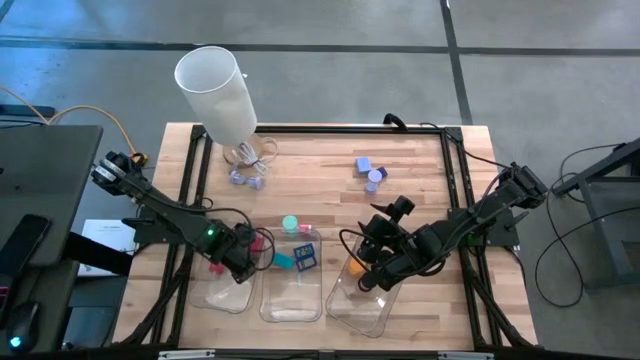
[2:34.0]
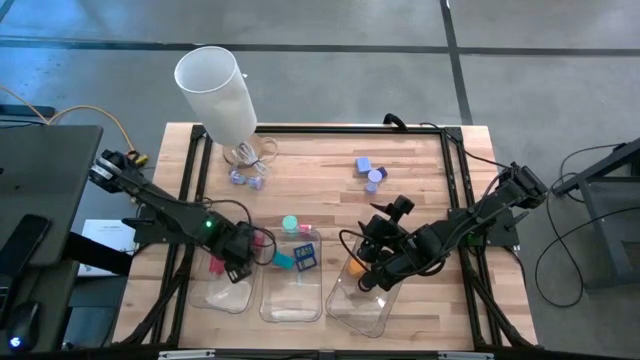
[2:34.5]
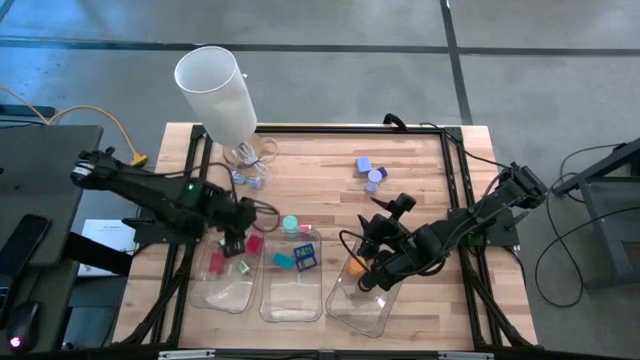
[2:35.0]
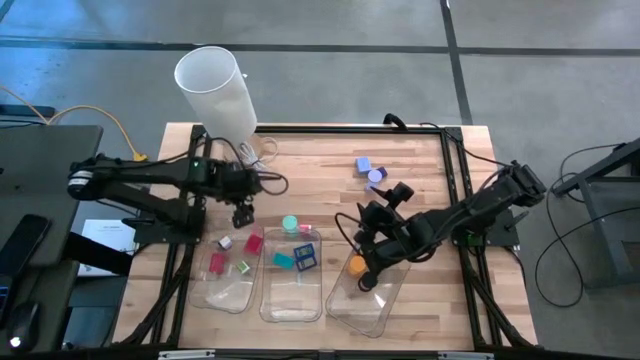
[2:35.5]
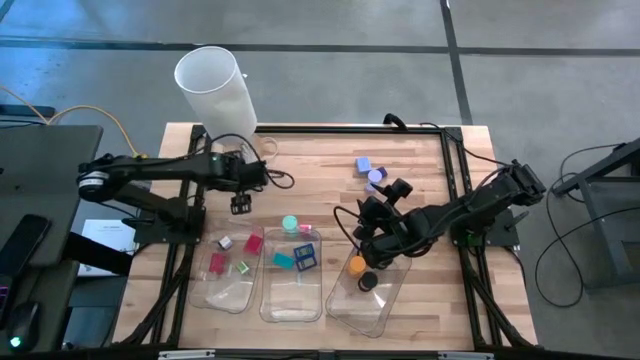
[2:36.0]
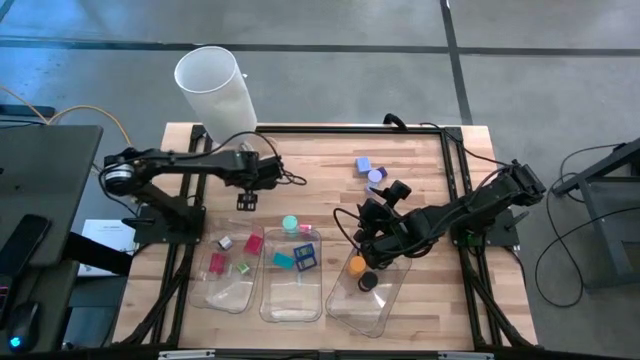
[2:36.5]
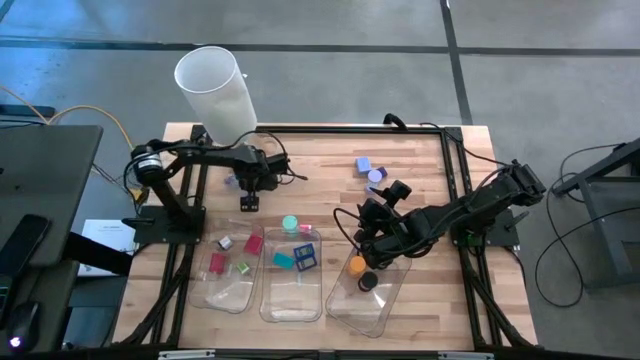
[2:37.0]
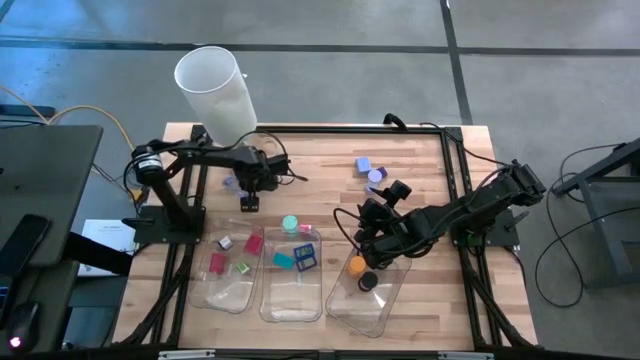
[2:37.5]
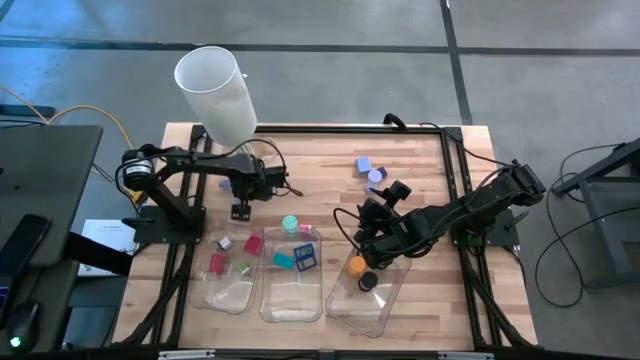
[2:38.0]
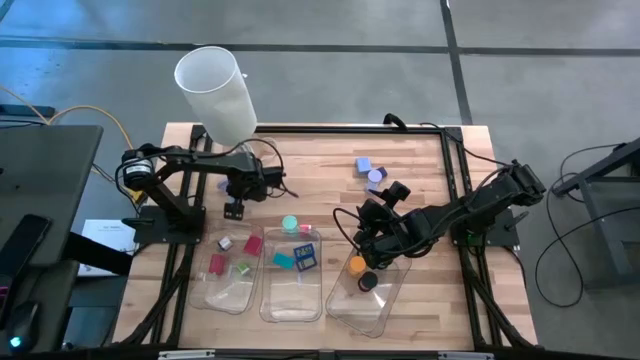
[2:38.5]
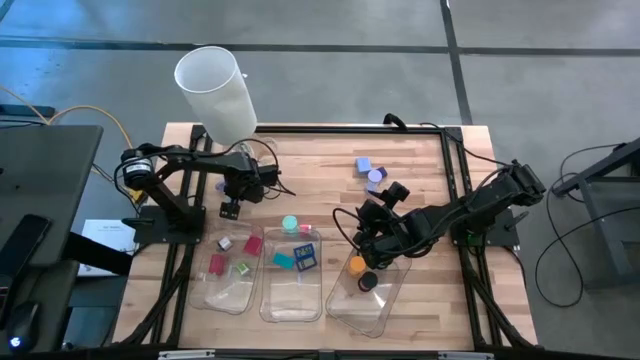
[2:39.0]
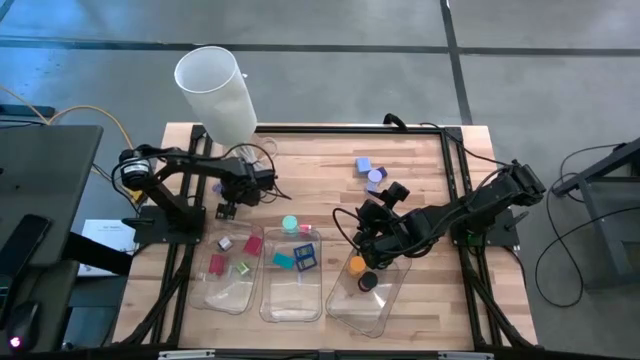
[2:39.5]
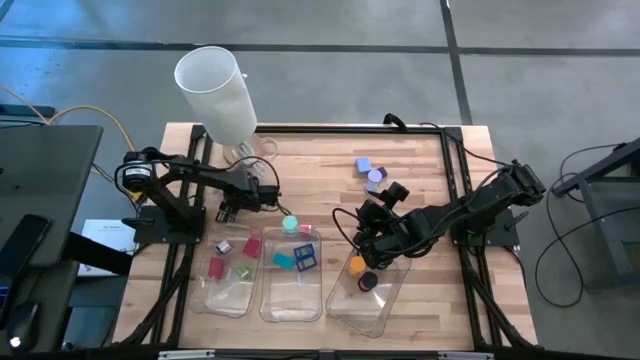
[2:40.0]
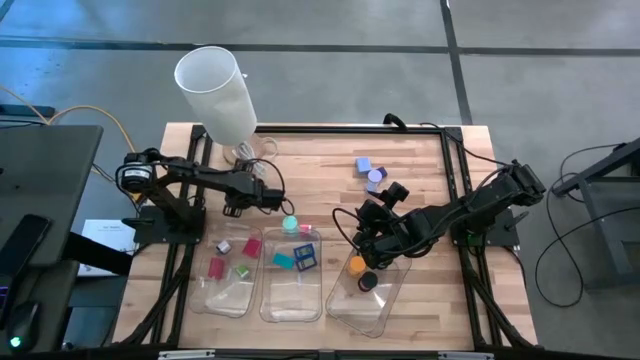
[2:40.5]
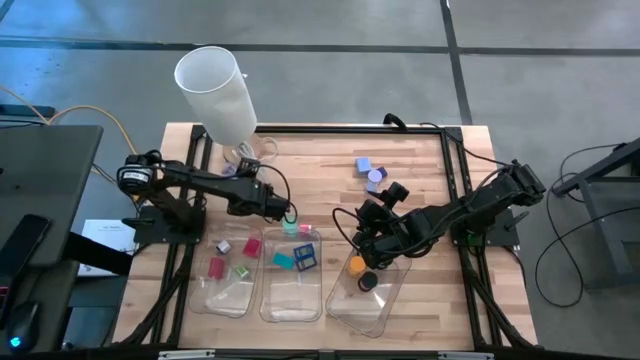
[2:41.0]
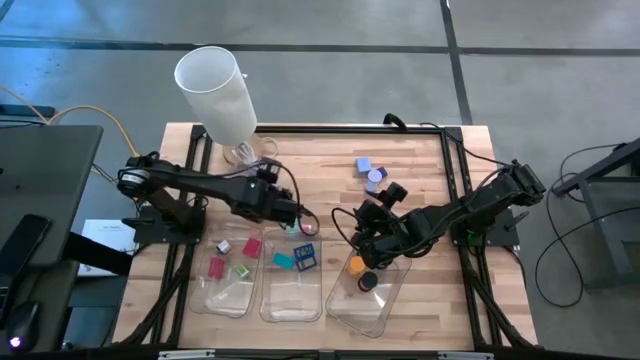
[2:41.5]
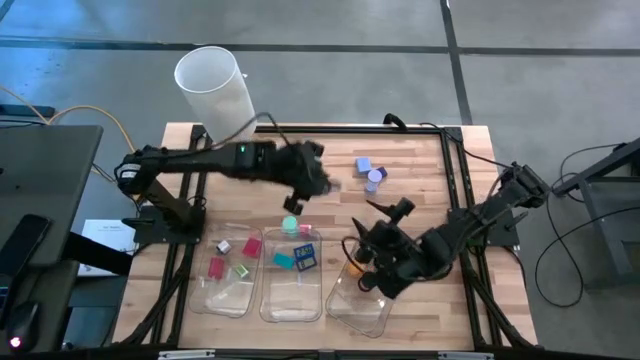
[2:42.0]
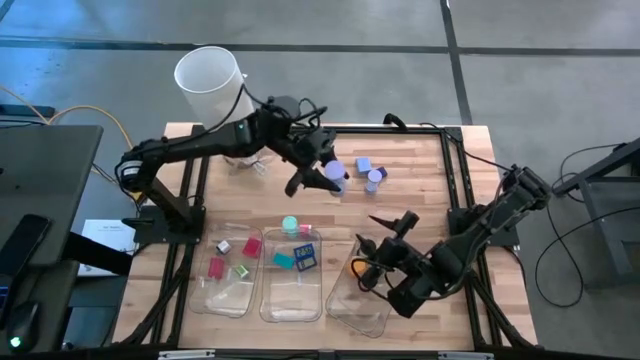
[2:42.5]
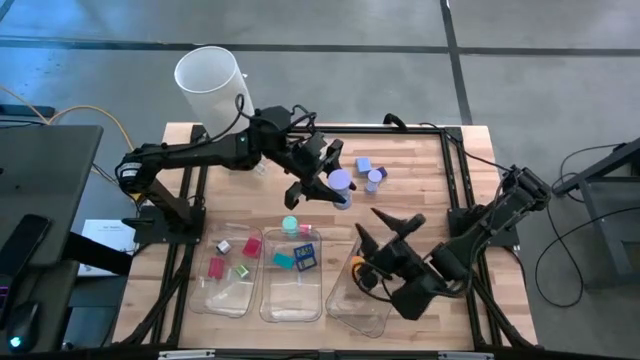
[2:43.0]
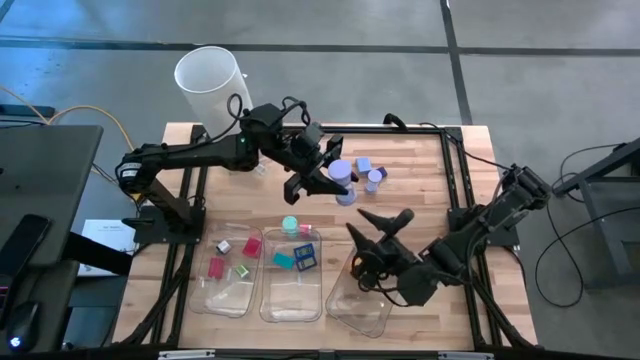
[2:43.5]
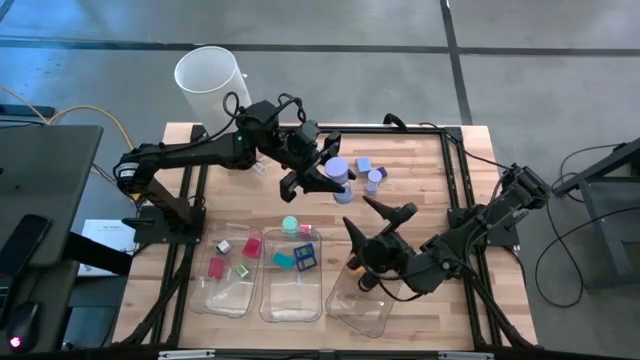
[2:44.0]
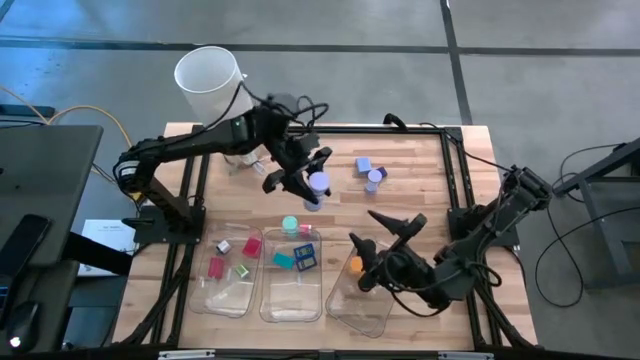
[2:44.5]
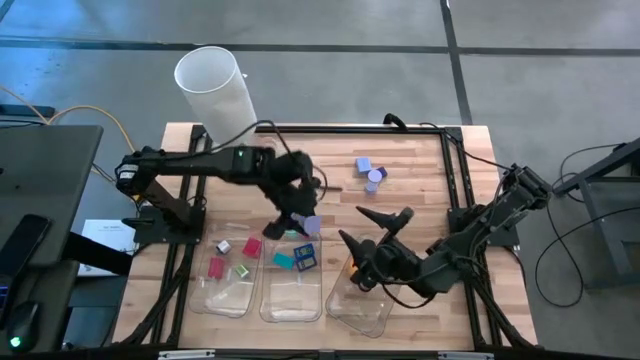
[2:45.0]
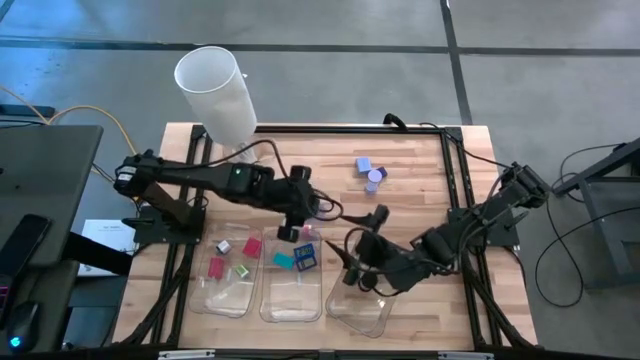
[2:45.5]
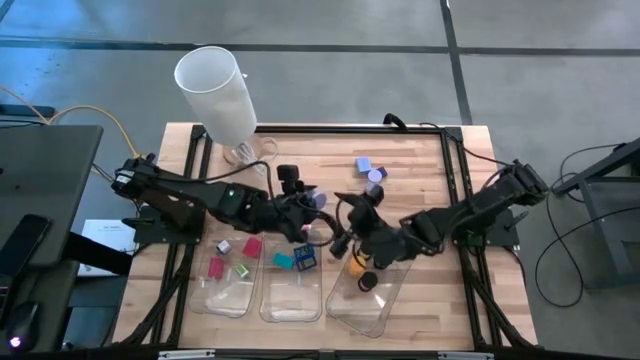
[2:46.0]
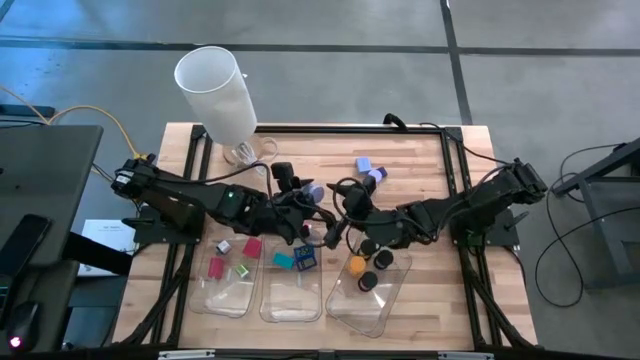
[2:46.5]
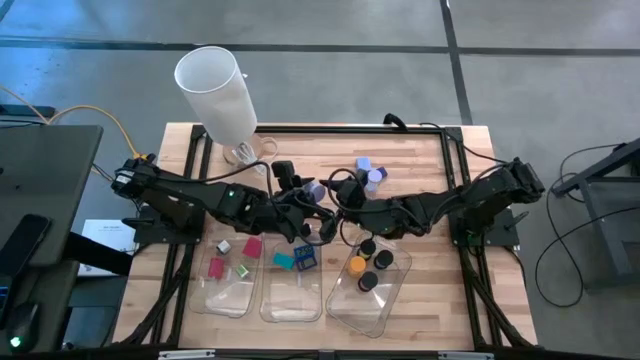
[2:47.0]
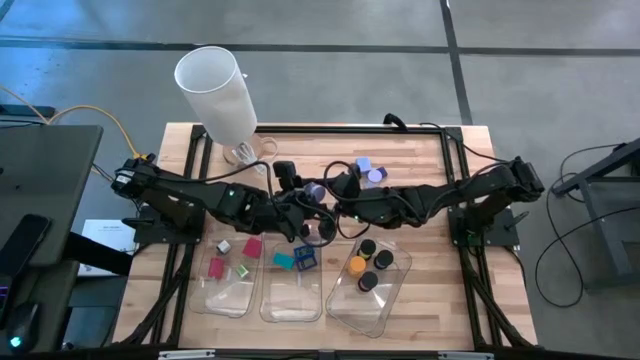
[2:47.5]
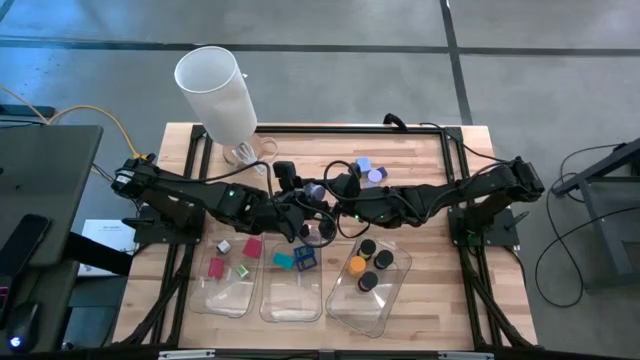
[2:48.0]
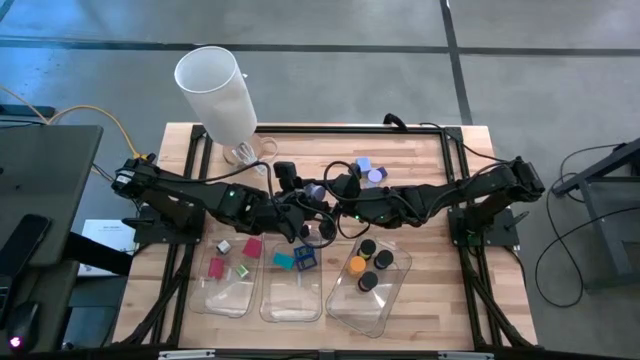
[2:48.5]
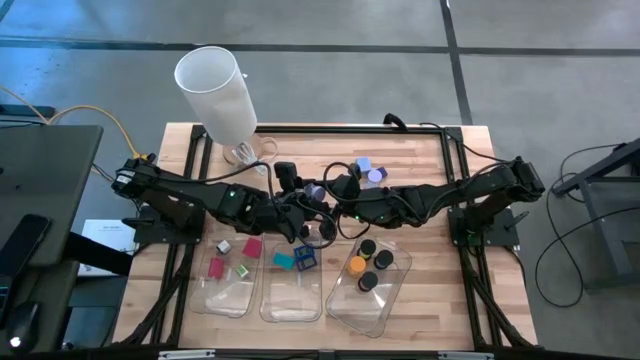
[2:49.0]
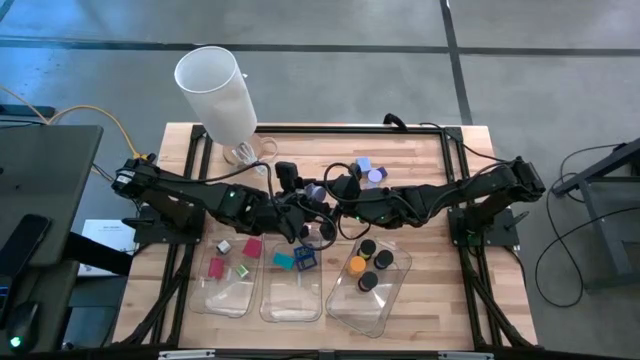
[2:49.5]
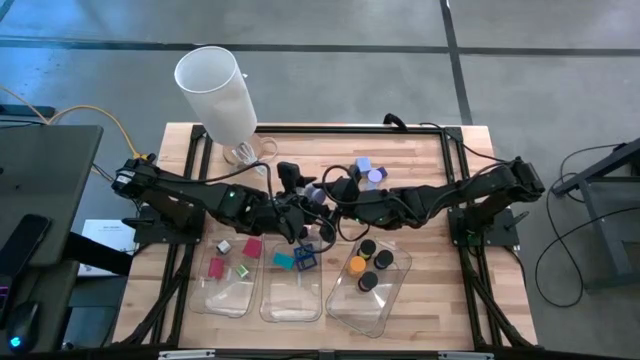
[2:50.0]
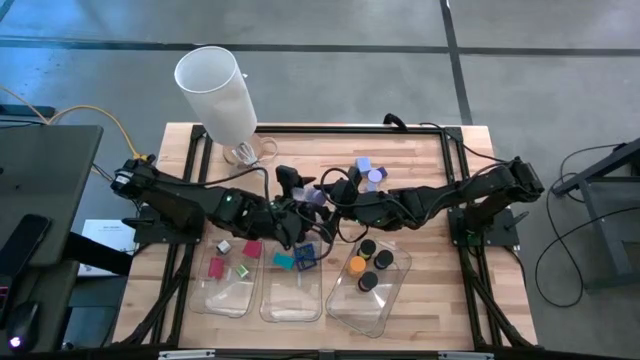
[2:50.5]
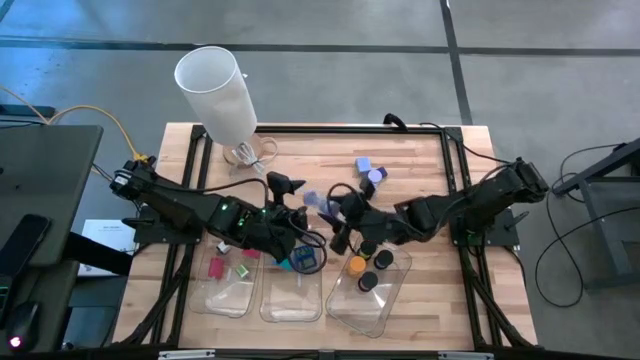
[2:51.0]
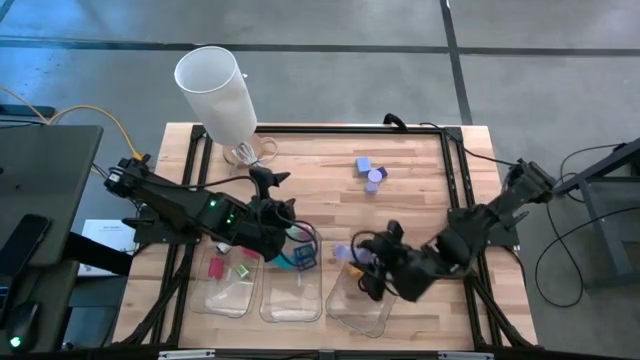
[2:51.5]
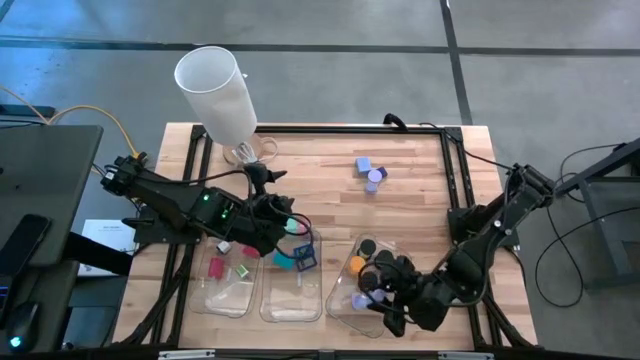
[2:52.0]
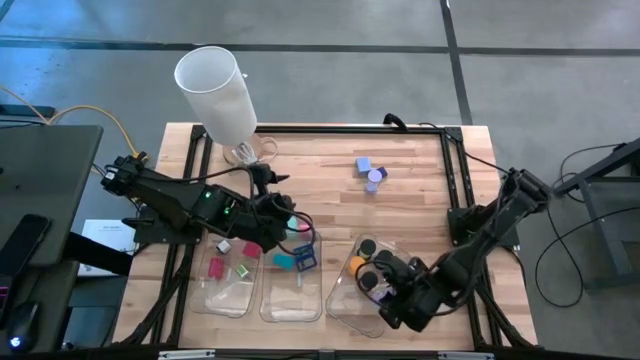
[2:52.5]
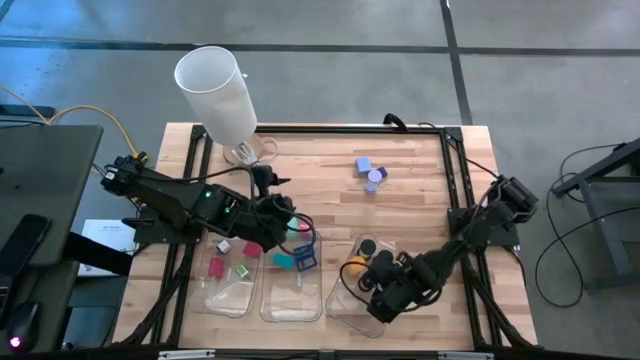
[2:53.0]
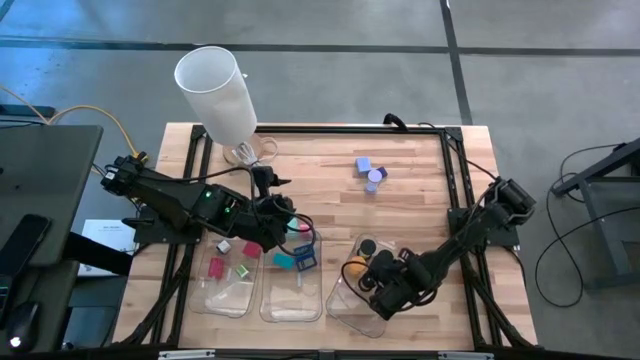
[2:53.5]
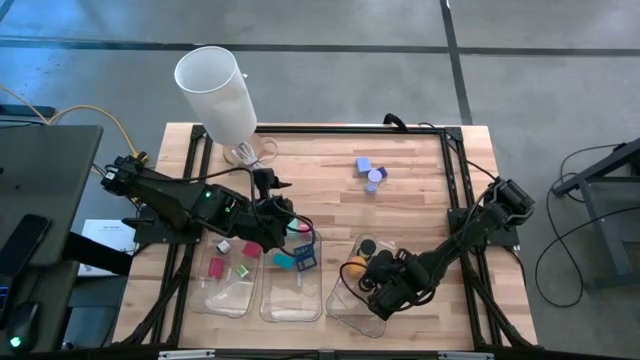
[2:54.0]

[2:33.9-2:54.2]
Task: Pick & Place Office items
Put the left purple hourglass into the right bin

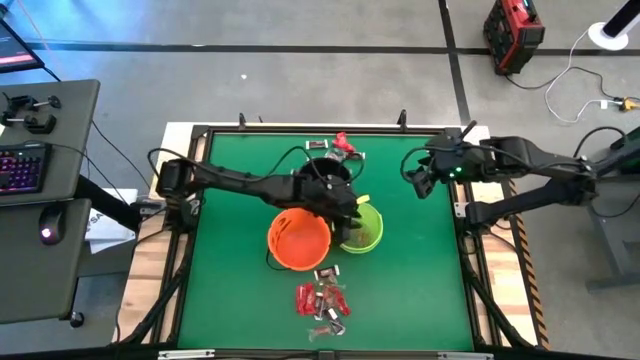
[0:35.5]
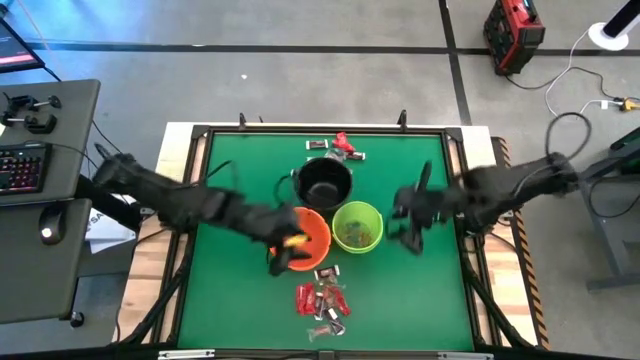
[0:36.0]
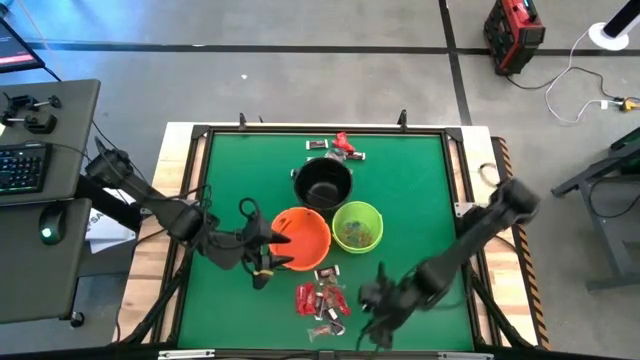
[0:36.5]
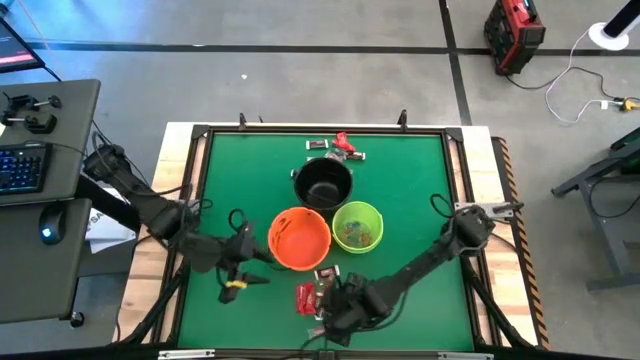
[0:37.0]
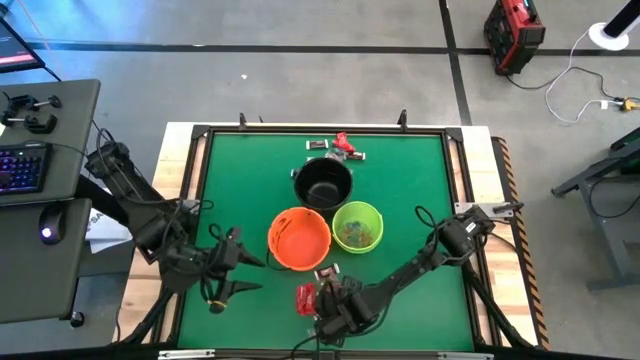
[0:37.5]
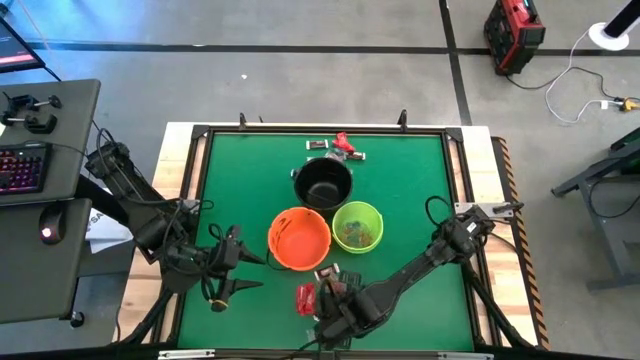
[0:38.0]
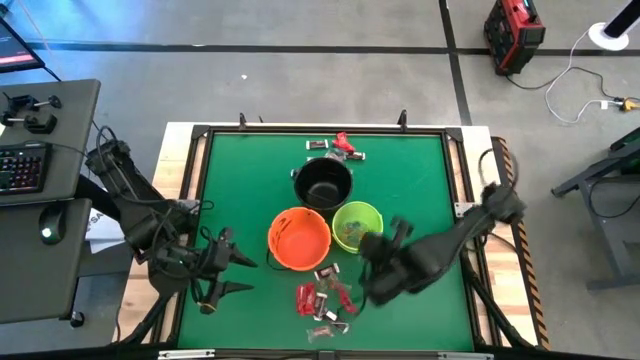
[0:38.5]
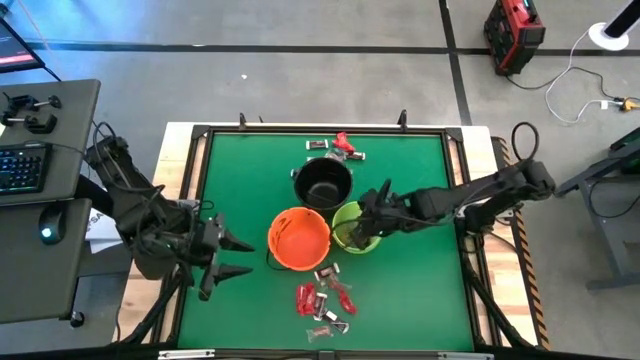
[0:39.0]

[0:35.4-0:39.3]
Task: Sort candy by brand, put in halloween buckets
Put the orange gummy into the green bucket
